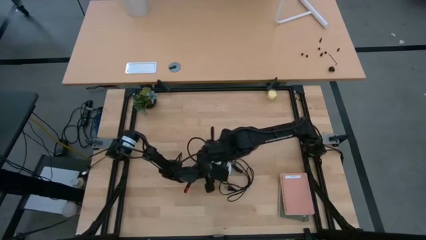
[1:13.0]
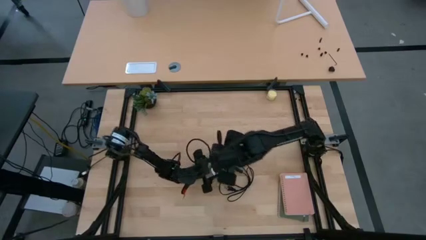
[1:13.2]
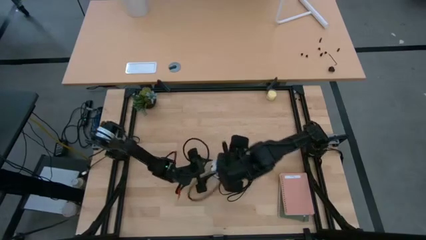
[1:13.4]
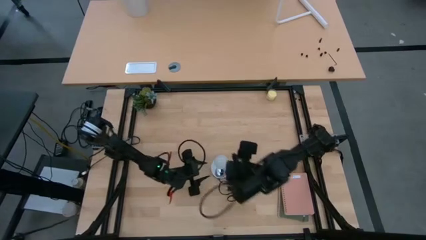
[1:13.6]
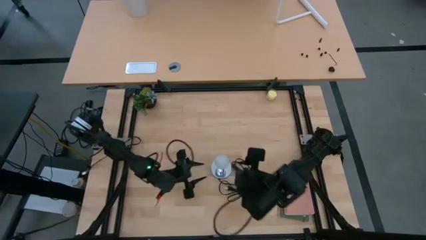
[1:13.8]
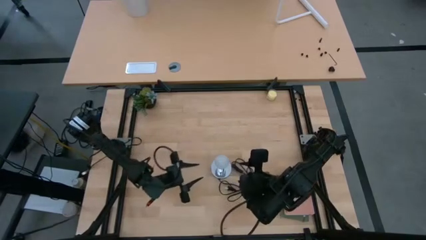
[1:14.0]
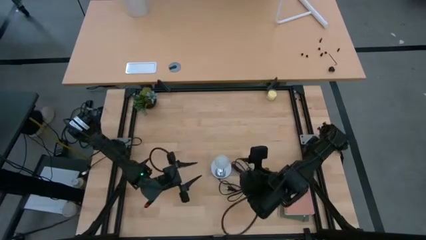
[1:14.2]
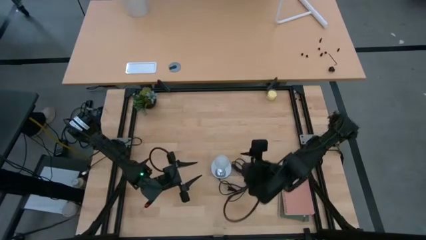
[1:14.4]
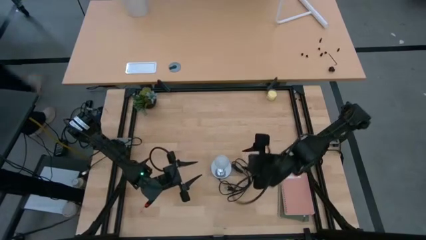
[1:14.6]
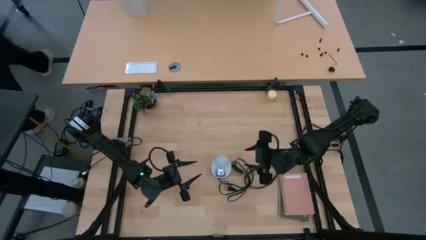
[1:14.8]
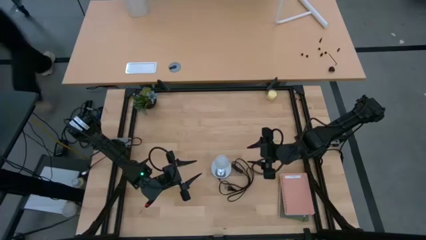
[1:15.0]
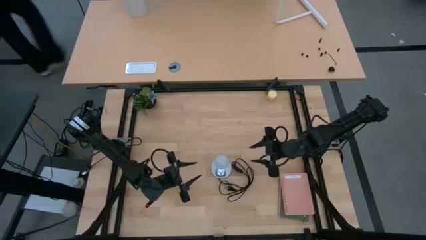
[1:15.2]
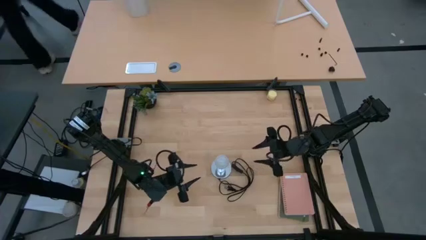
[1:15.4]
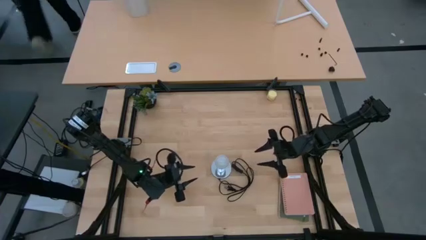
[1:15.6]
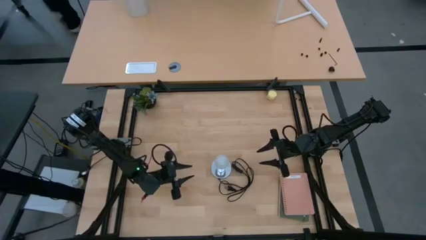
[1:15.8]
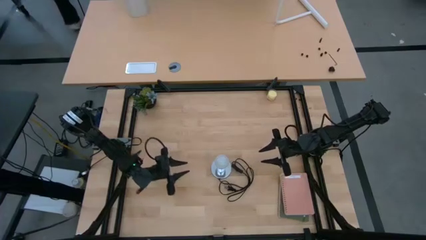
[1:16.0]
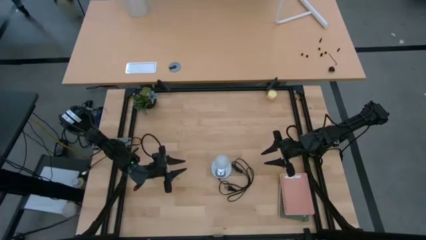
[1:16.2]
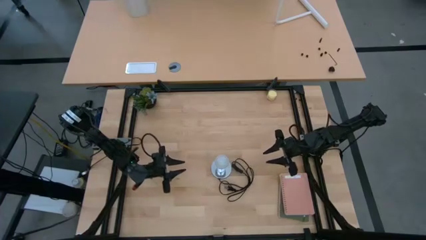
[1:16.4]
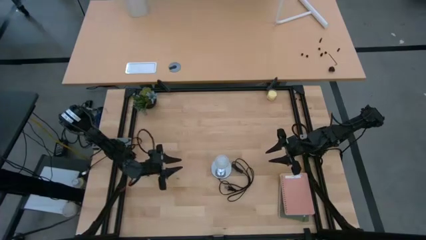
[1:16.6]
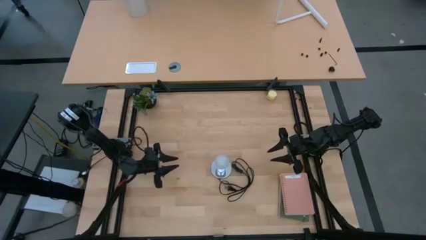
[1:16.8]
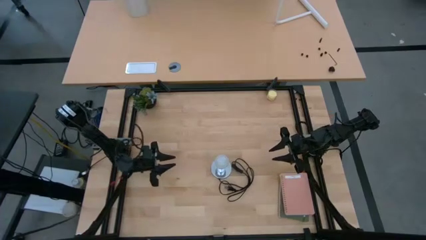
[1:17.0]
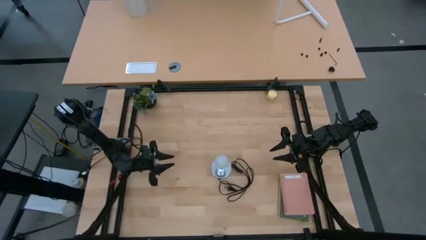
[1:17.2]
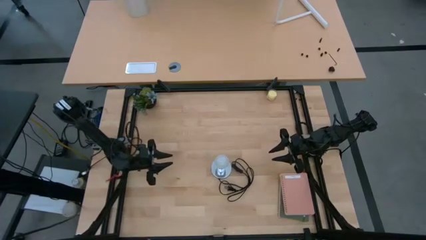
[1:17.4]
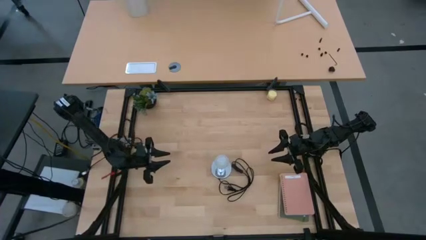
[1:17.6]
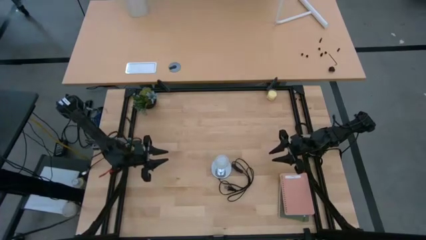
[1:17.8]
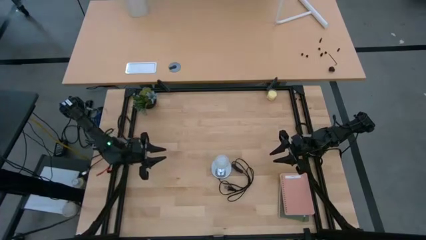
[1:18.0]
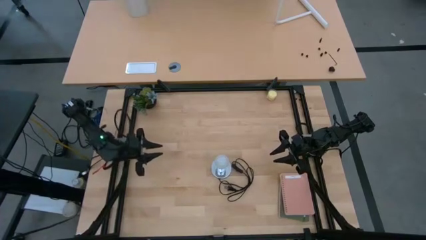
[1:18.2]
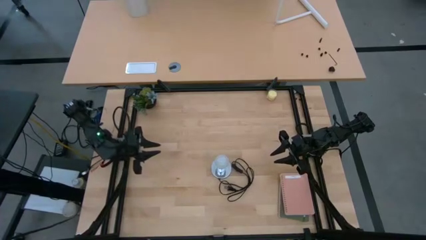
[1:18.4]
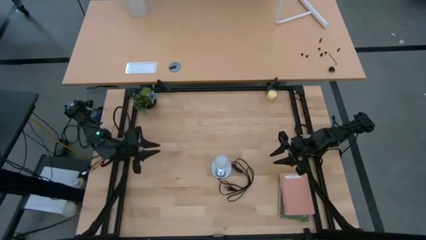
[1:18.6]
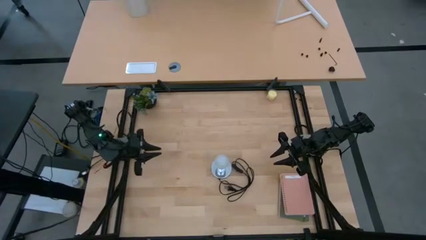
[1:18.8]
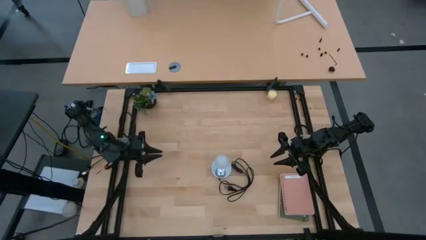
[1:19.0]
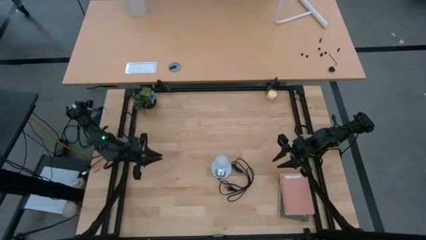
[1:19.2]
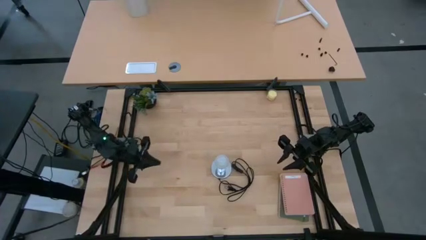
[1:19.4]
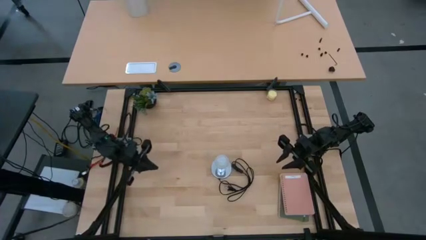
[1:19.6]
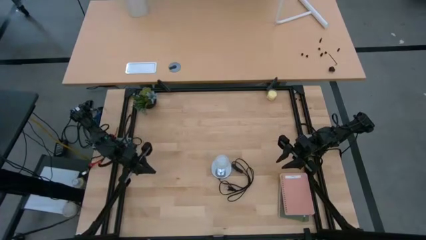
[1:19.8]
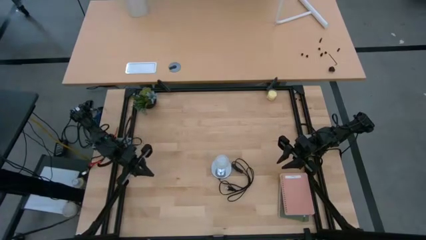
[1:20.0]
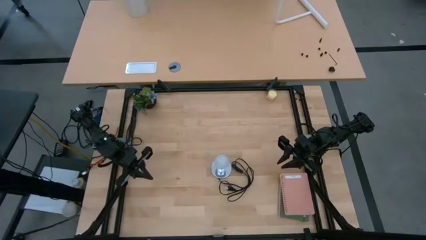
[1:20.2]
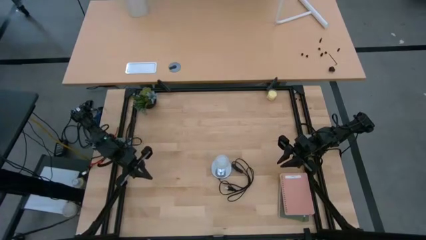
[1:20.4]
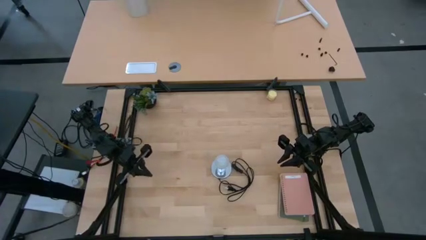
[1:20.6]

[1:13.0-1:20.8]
Task: Screw lightbulb
Return to Home Position
